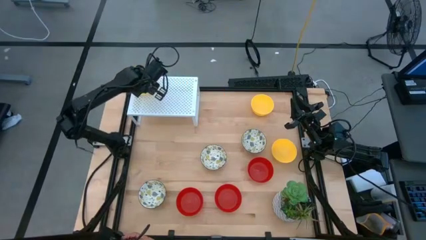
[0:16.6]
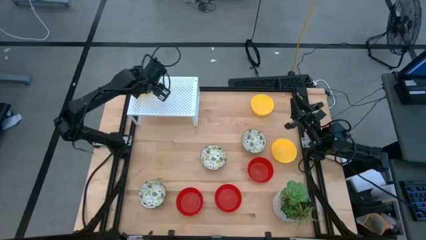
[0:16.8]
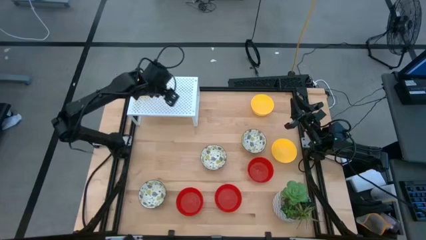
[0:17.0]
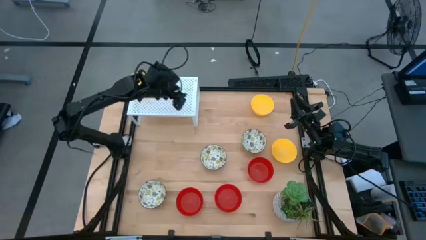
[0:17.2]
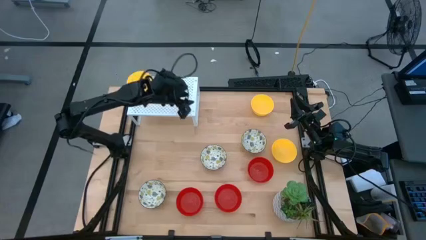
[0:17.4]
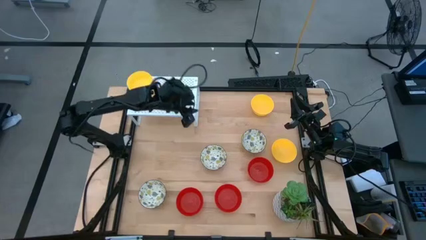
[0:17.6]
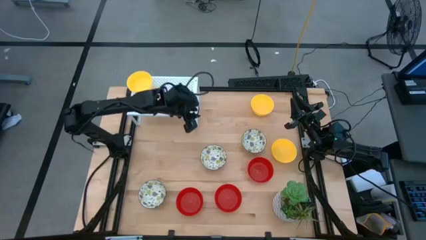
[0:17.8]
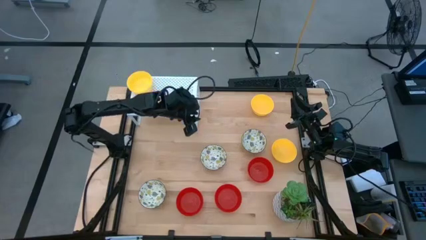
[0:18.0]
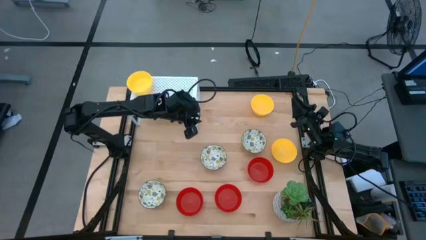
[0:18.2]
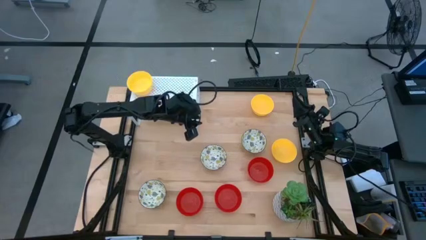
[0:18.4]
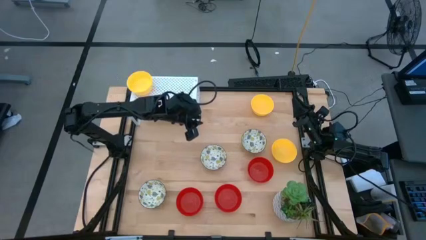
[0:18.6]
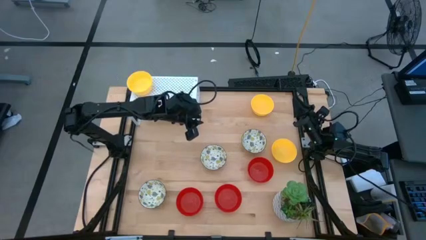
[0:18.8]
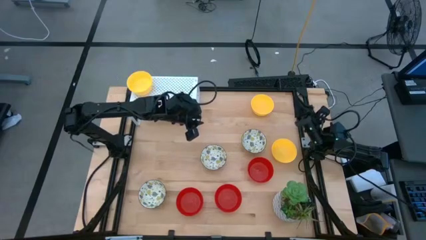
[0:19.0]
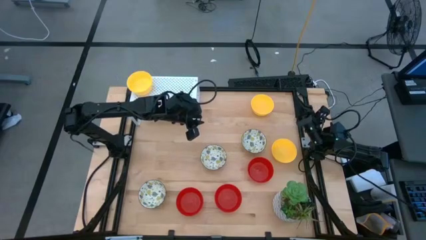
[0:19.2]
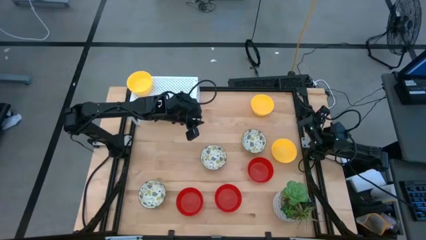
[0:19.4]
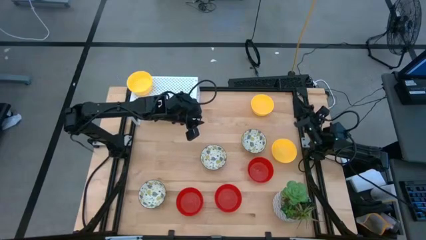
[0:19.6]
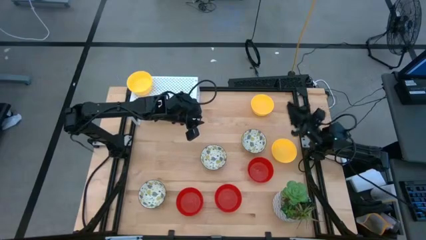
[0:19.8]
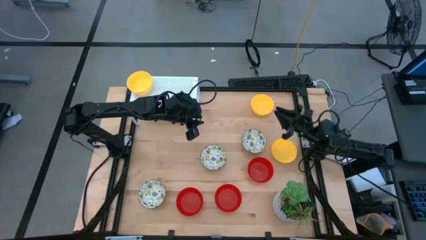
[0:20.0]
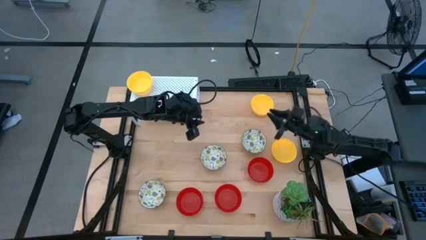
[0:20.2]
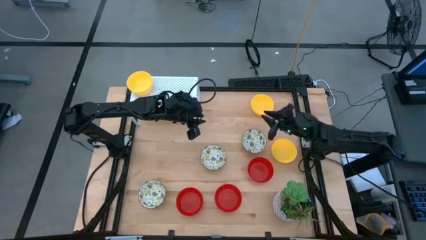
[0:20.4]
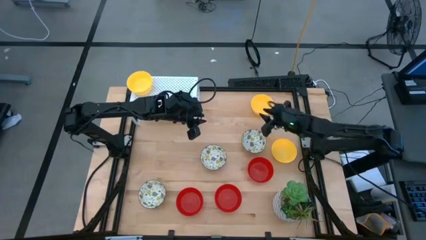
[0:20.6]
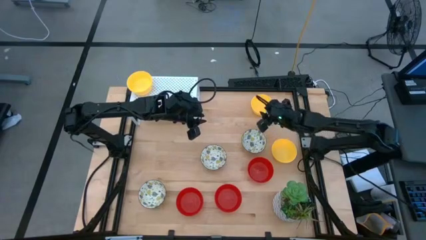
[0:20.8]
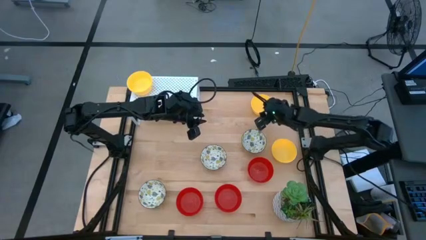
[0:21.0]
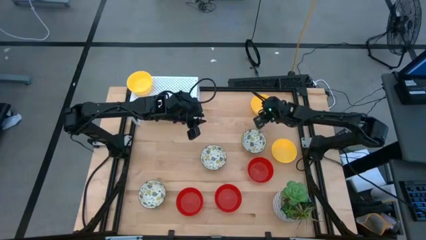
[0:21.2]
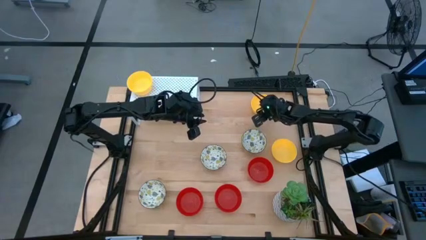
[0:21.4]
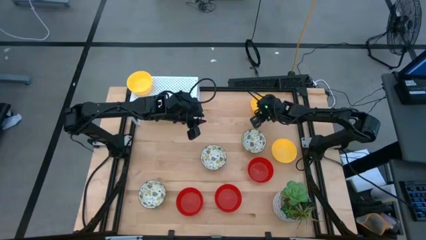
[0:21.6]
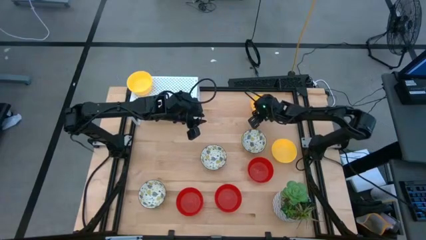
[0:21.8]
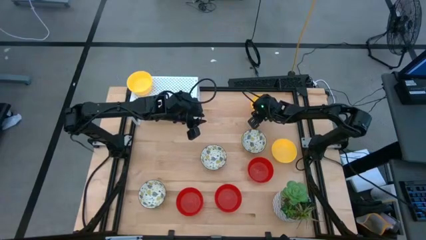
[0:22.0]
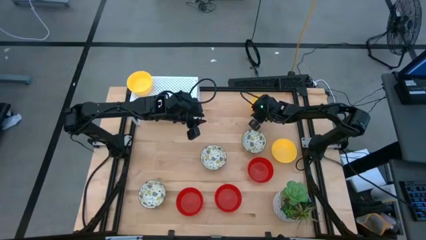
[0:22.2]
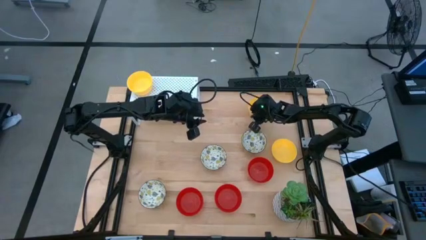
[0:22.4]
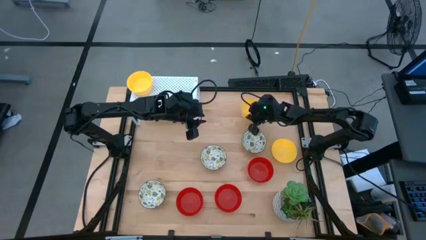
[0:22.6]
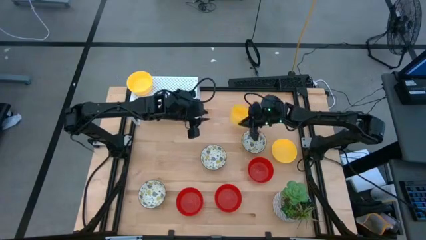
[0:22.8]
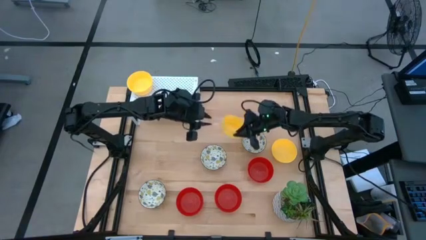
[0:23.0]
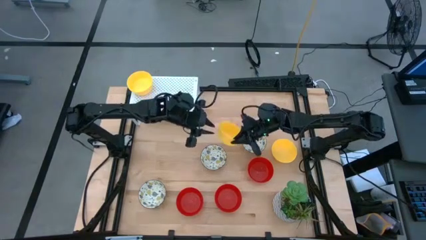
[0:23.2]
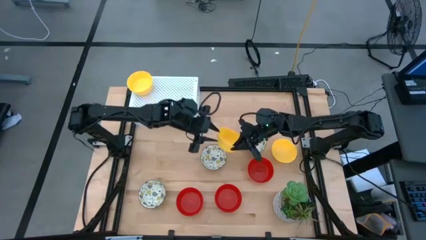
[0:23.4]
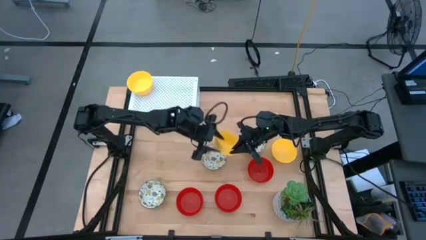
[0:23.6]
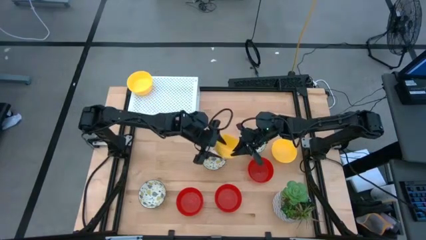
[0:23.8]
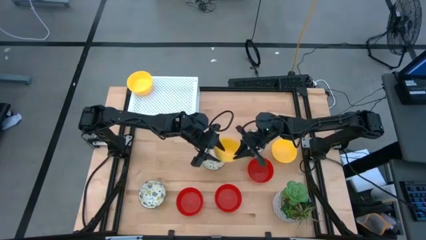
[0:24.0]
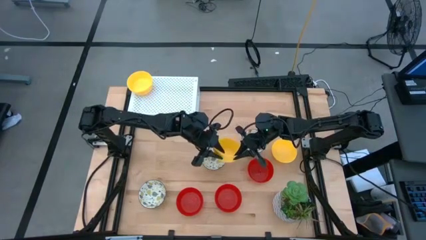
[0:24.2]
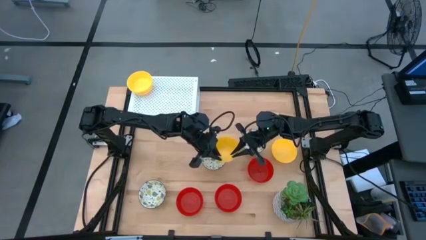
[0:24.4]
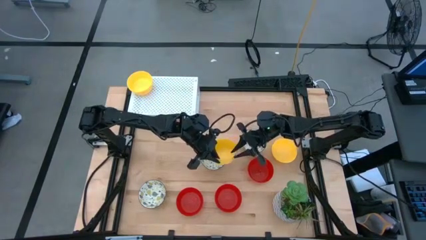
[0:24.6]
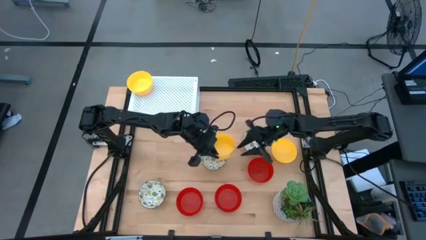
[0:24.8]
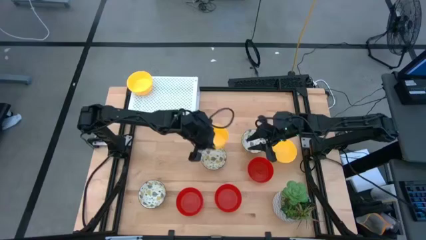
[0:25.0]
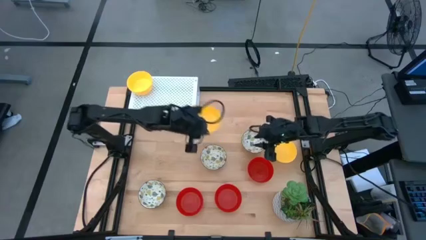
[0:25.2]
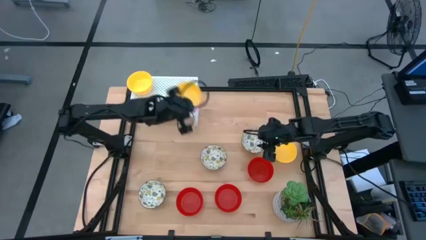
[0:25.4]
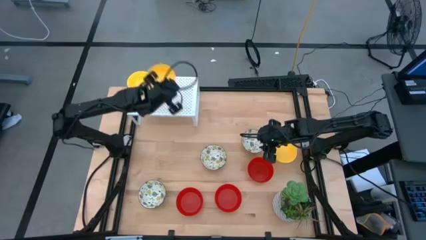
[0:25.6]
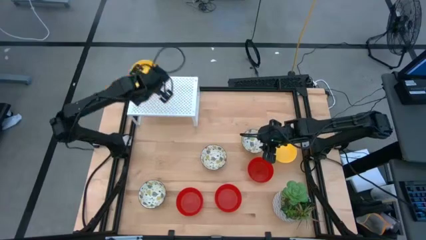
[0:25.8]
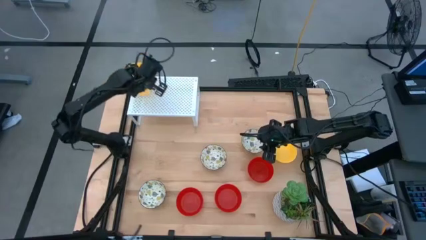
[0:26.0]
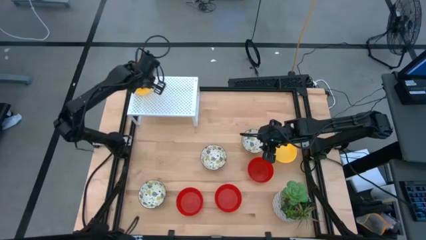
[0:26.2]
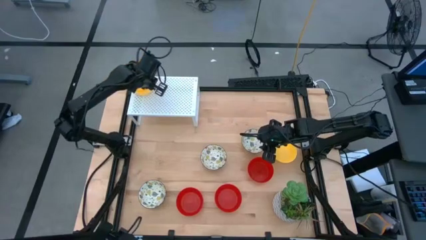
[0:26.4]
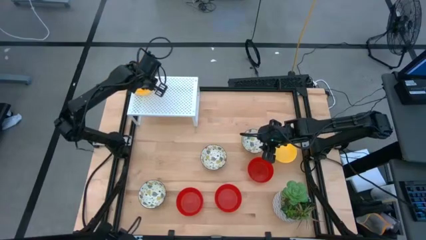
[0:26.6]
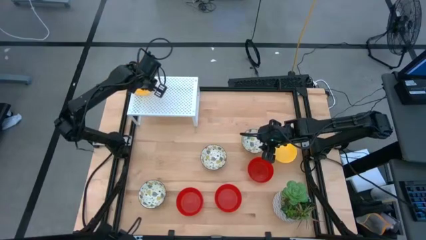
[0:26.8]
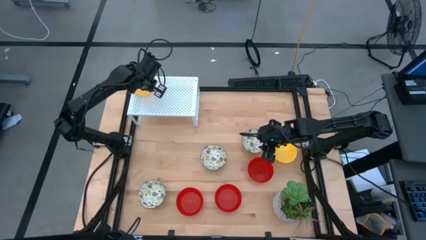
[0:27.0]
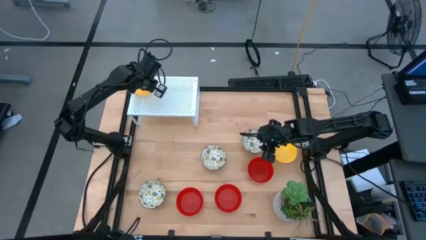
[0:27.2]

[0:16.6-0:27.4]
Task: Pick & Place Mini bowls
Stack the yellow bowl on top of the other yellow bowl on the shelf

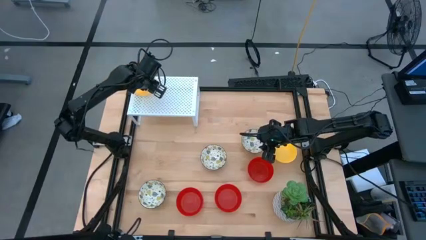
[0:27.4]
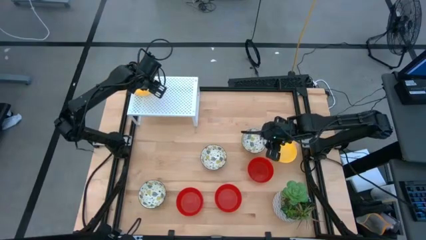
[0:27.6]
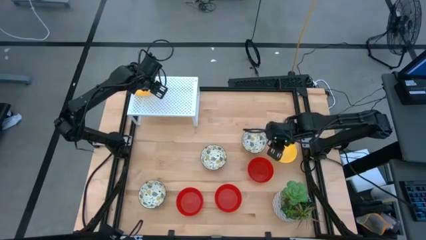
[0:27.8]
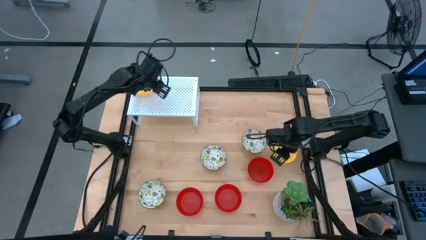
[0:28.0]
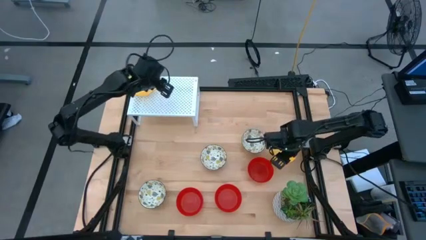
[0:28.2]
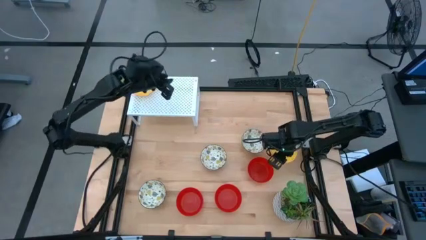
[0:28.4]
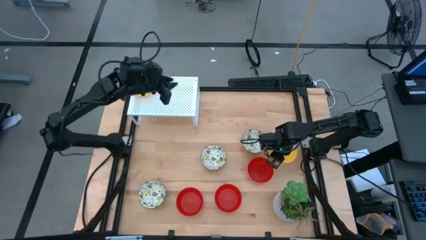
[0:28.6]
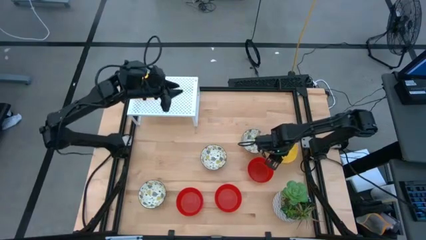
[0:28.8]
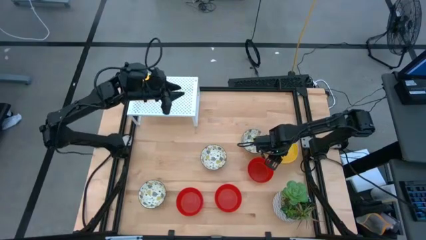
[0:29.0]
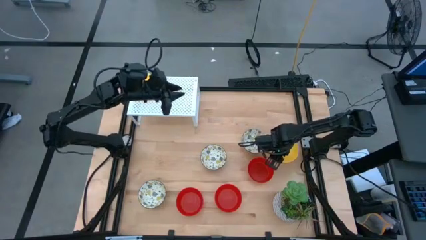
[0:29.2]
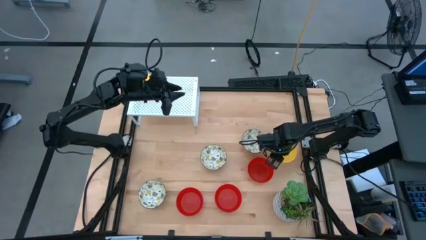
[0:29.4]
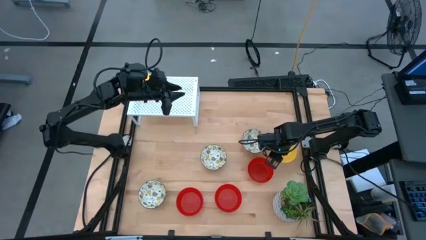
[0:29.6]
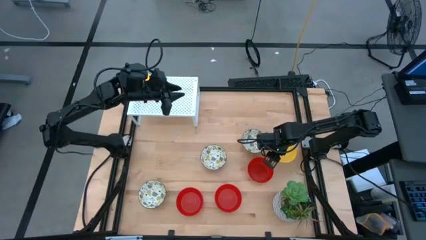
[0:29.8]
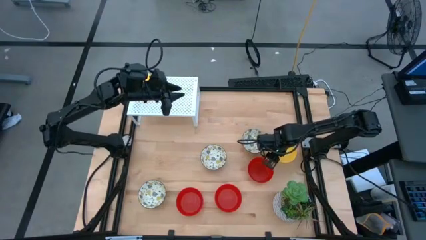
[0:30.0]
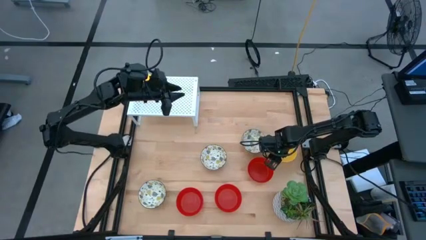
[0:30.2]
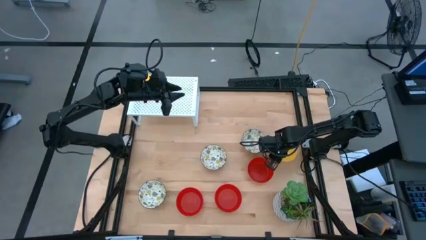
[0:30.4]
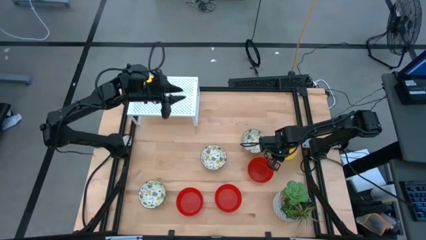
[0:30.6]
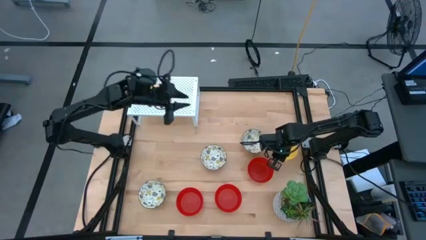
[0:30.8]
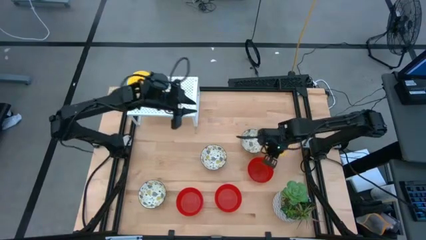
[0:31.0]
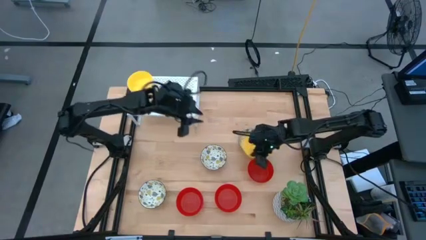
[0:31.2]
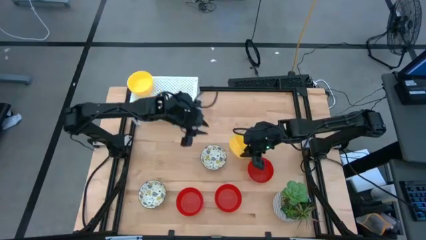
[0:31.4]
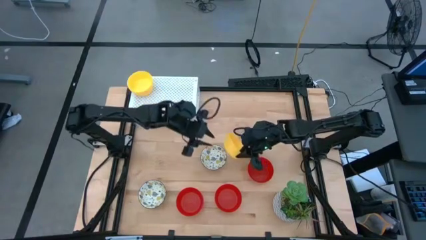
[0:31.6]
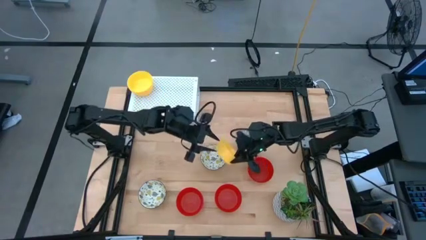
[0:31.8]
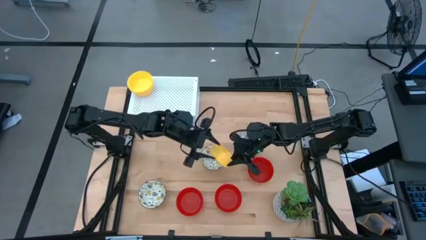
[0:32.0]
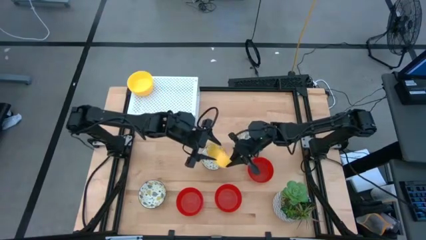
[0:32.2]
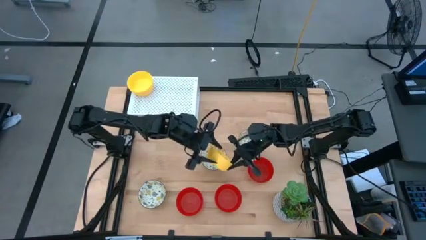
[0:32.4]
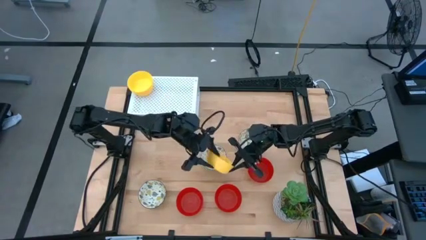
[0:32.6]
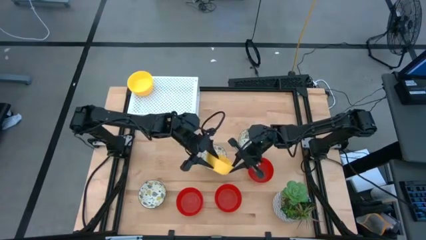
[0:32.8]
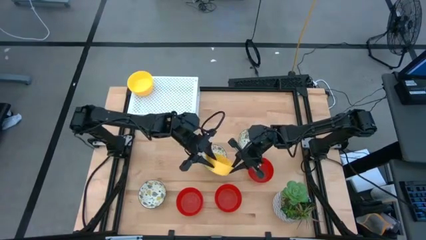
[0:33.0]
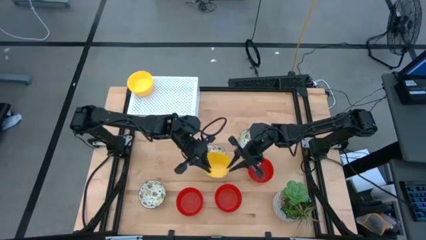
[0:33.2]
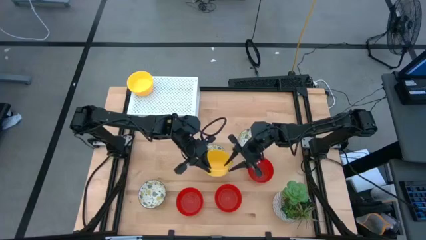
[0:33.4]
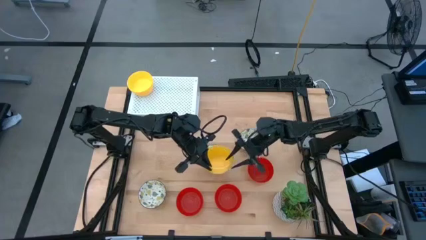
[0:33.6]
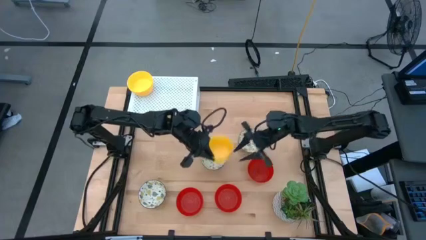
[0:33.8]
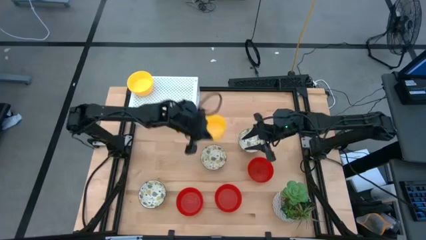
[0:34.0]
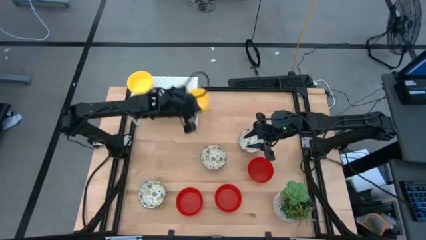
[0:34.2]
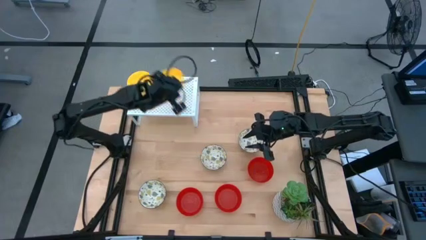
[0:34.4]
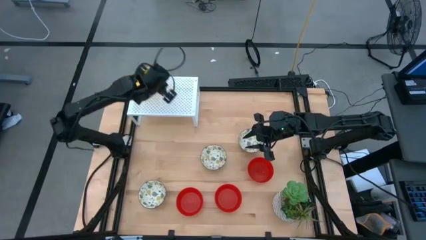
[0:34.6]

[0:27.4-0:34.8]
Stack the yellow bowl on top of the other yellow bowl on the shelf
